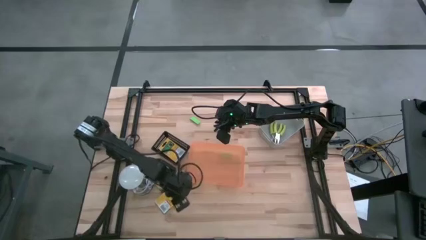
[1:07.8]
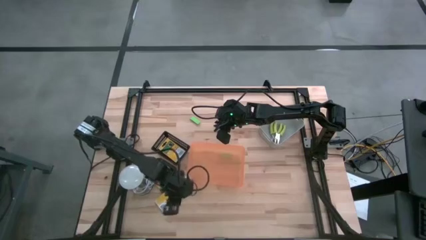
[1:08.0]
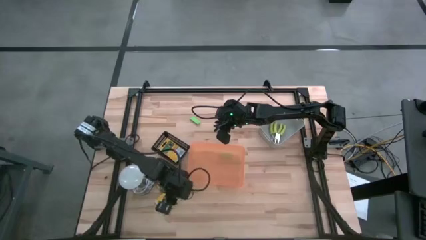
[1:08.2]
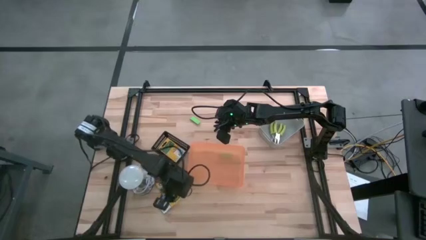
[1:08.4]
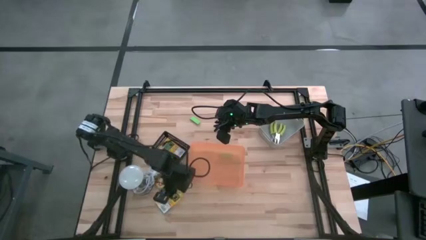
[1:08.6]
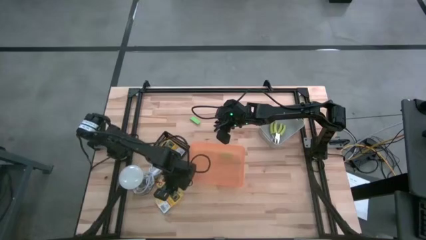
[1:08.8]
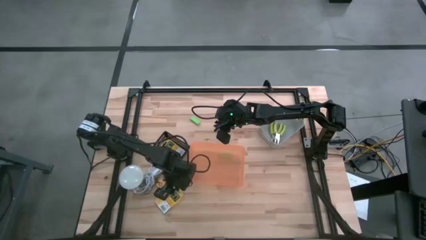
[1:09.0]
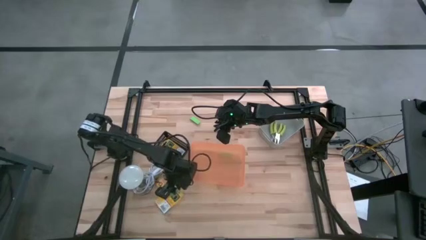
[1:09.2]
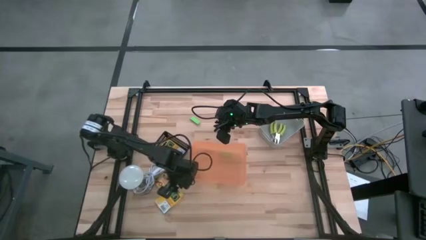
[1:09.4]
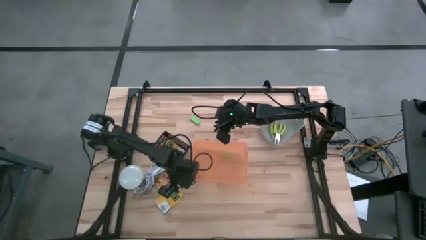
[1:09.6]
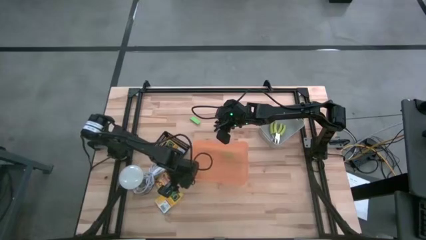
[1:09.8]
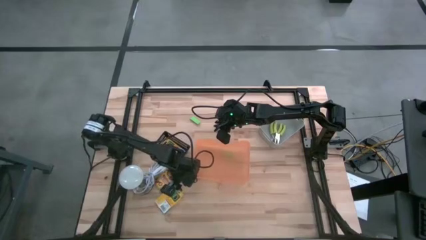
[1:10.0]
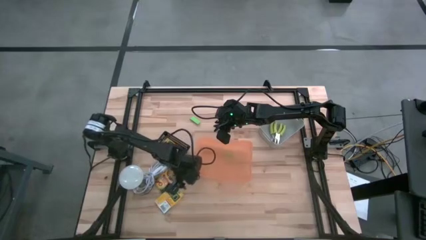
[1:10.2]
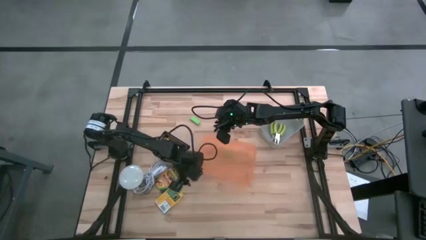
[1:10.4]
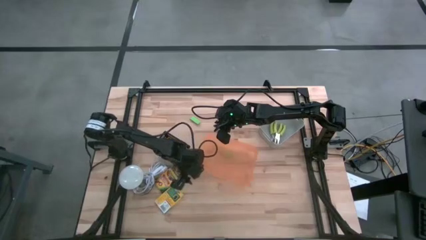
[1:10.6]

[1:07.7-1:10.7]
Task: Pick & Place School Supplies
Adjust the orange bin on the table

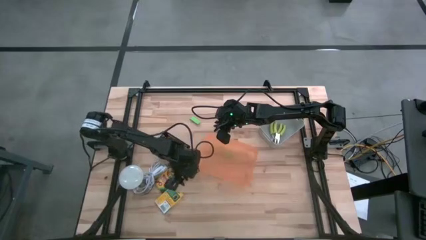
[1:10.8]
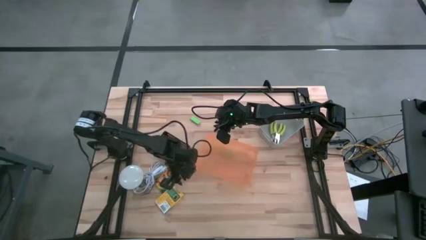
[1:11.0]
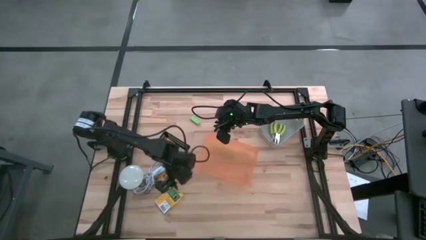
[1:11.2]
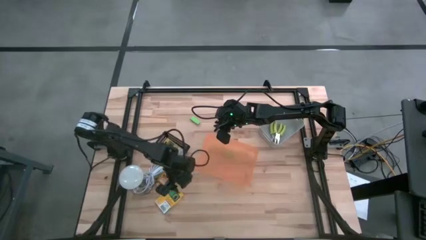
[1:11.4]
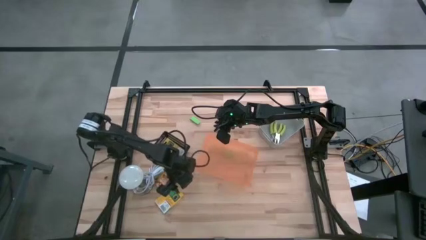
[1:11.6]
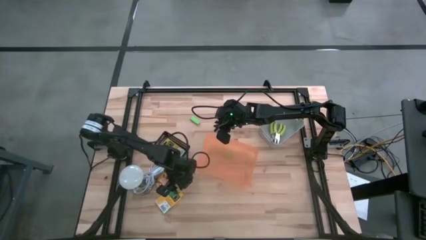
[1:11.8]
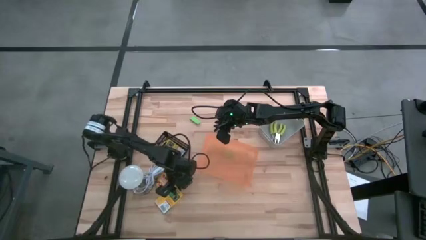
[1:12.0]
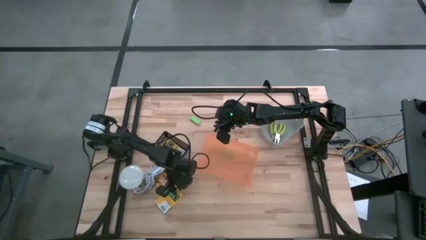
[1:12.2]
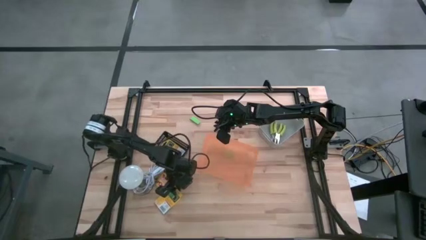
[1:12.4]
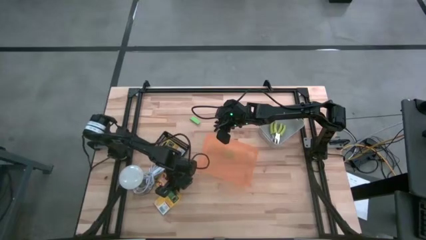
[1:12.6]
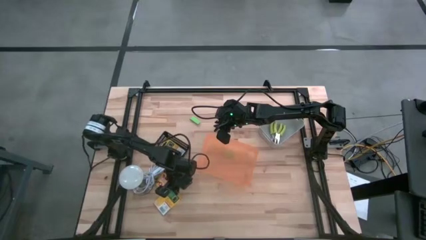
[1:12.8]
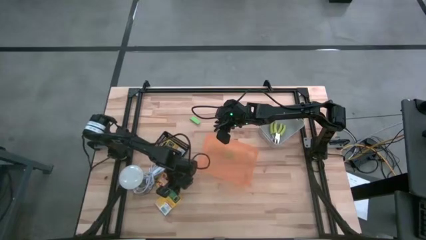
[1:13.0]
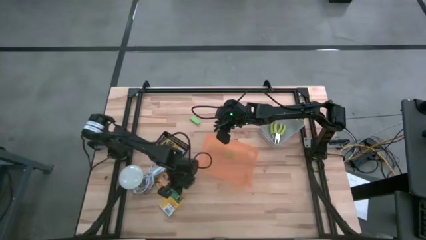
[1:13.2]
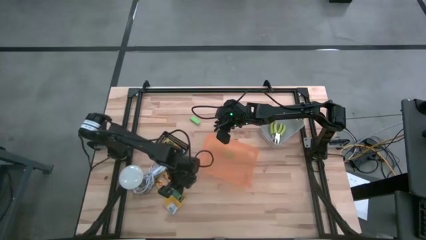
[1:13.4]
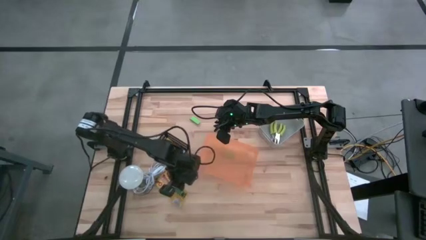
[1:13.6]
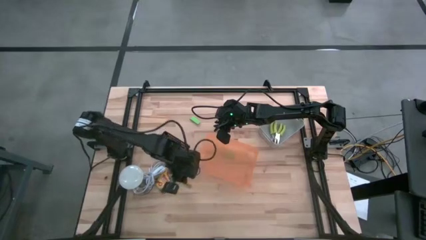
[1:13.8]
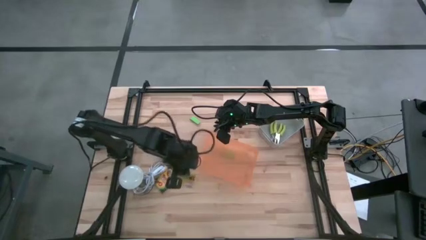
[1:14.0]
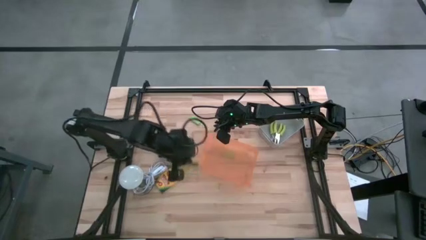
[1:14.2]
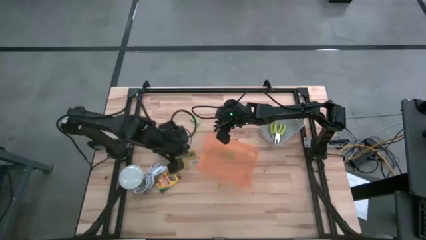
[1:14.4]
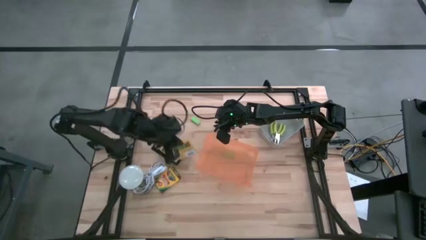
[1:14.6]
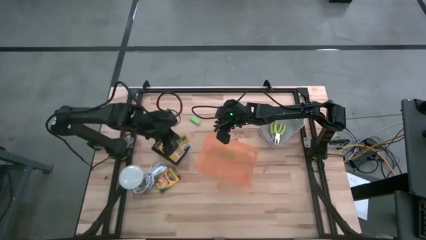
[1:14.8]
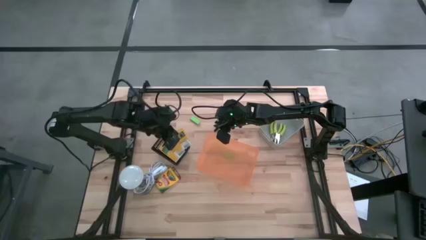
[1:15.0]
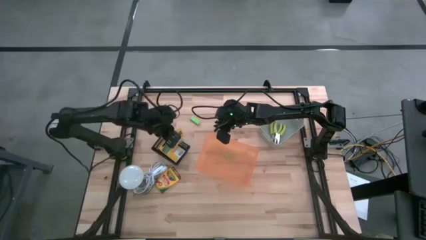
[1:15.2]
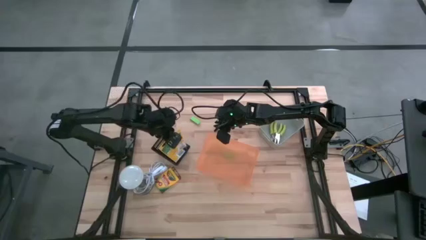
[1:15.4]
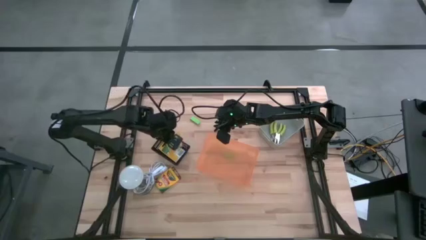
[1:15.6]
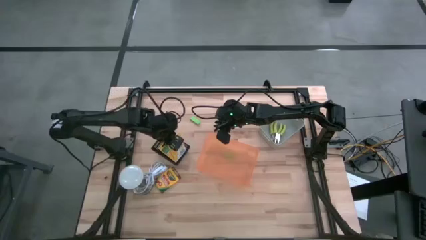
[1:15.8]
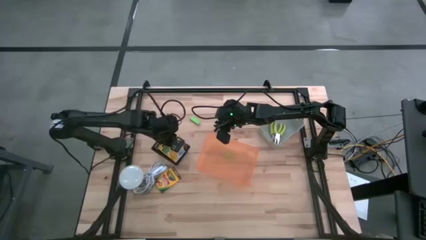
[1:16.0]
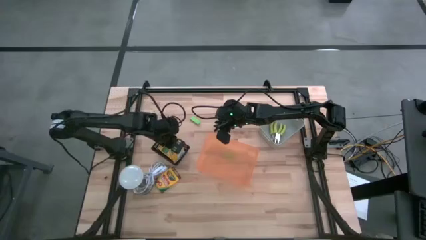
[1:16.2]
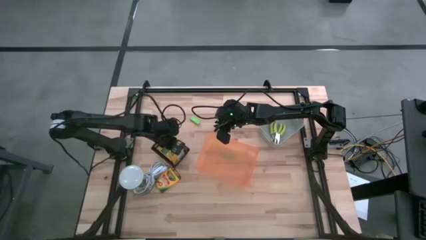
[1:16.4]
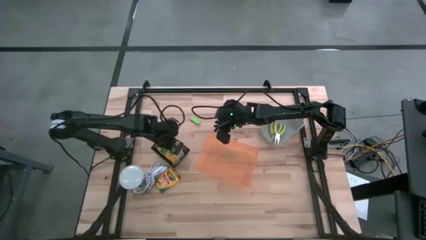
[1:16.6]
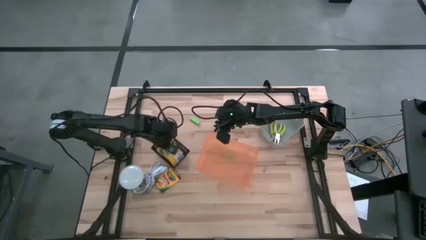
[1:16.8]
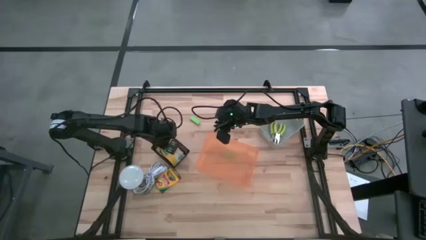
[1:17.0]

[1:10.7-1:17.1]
Put the bottom yellow crayon box into the black bin

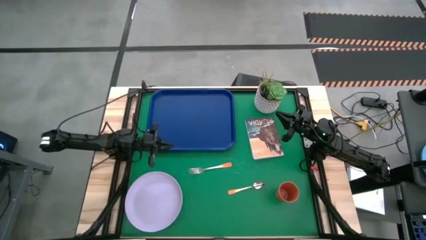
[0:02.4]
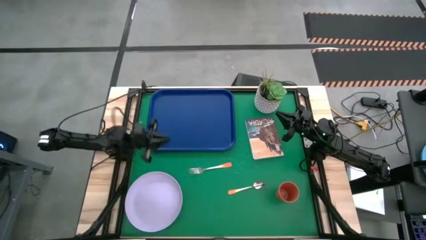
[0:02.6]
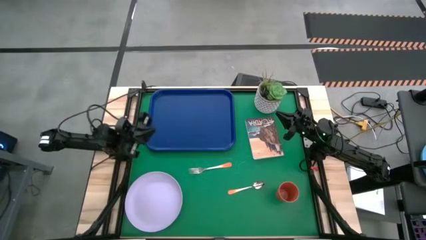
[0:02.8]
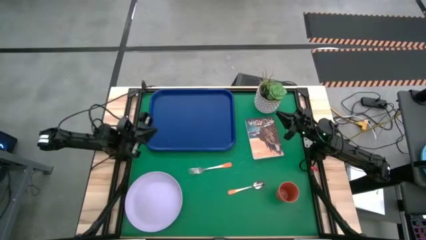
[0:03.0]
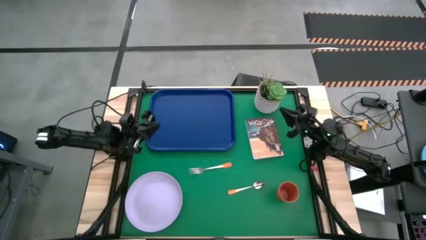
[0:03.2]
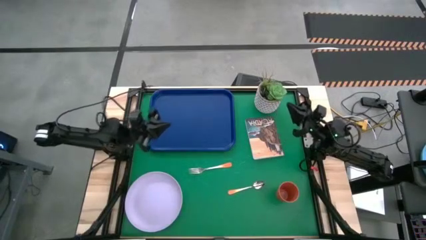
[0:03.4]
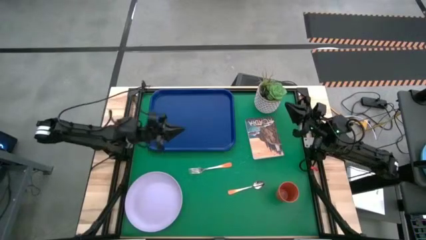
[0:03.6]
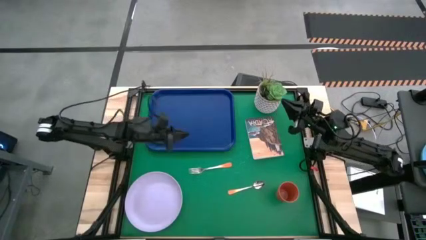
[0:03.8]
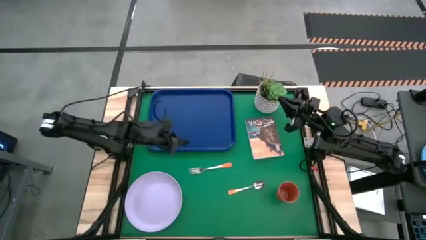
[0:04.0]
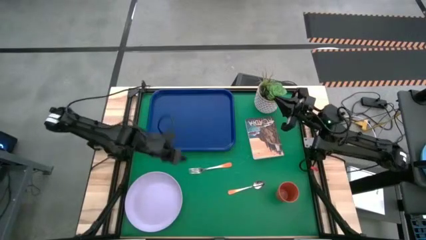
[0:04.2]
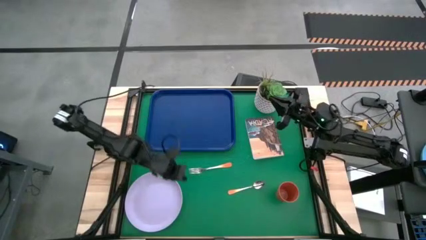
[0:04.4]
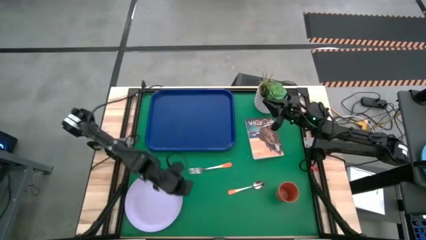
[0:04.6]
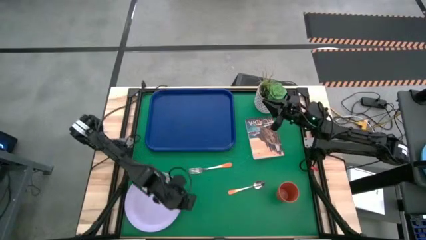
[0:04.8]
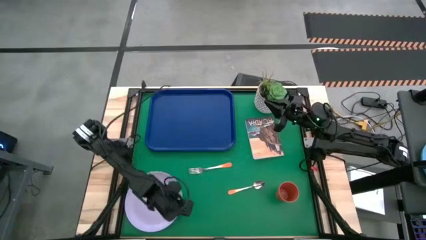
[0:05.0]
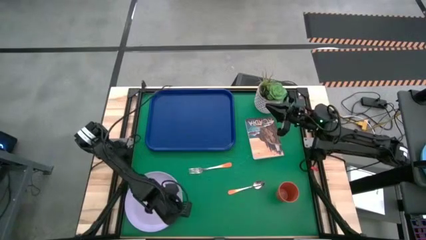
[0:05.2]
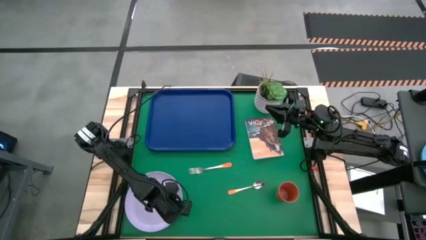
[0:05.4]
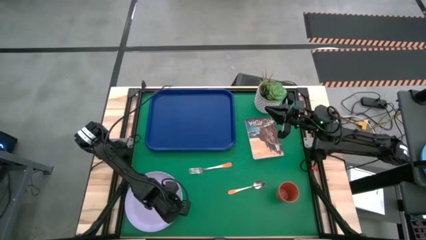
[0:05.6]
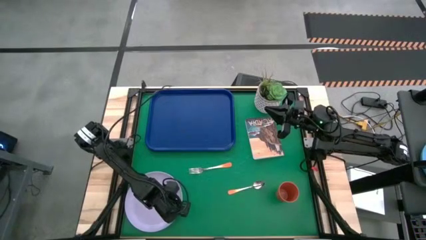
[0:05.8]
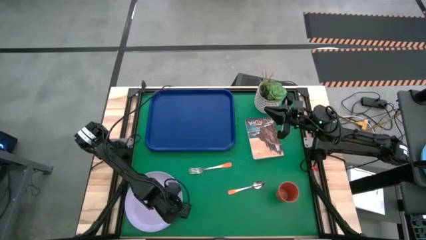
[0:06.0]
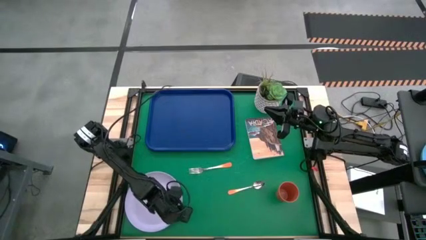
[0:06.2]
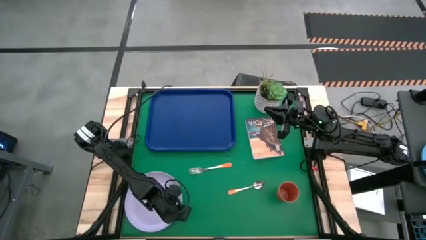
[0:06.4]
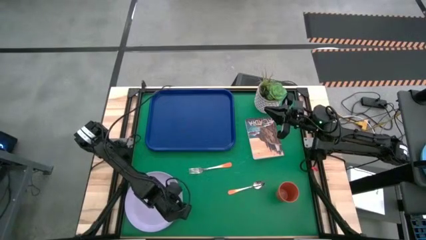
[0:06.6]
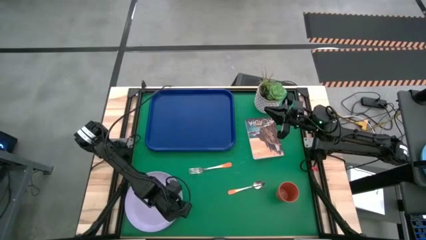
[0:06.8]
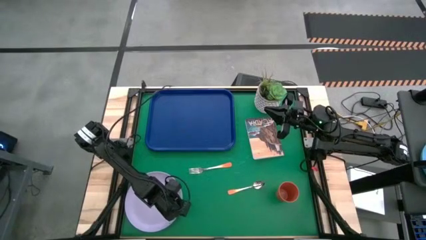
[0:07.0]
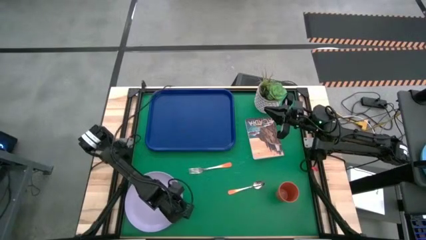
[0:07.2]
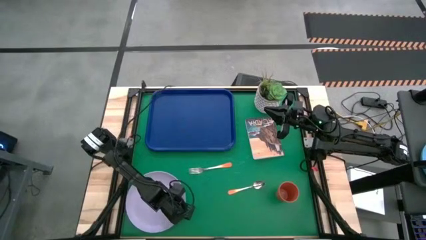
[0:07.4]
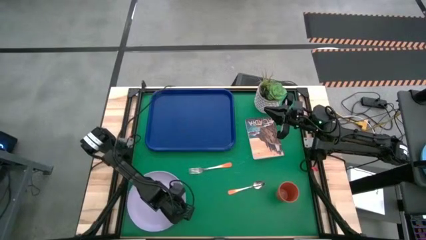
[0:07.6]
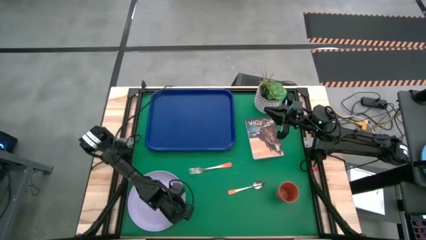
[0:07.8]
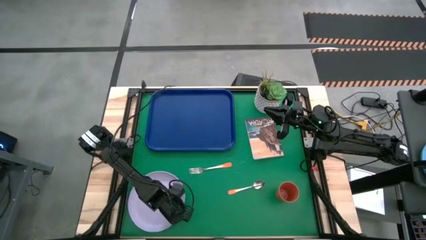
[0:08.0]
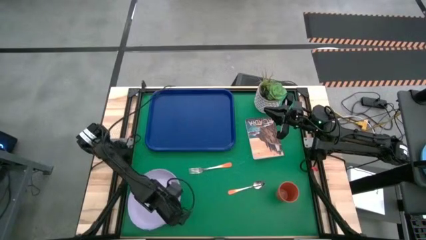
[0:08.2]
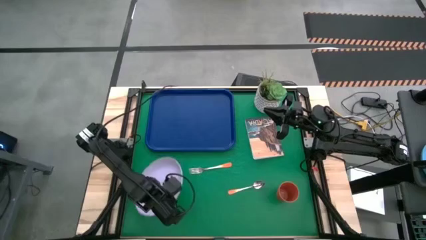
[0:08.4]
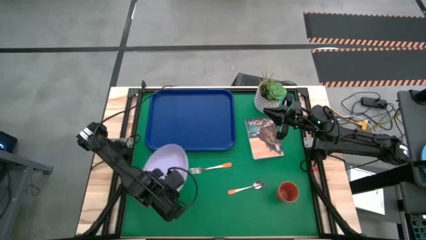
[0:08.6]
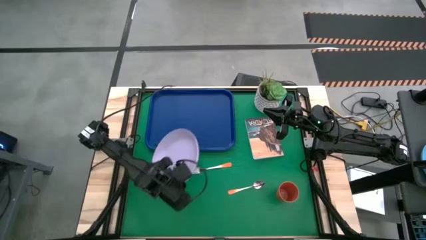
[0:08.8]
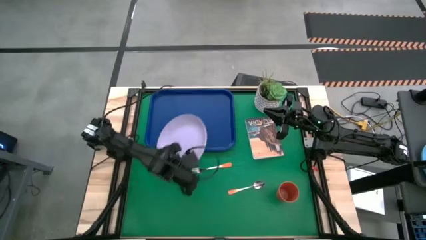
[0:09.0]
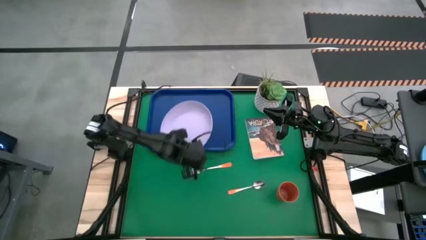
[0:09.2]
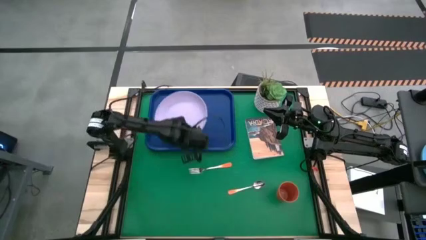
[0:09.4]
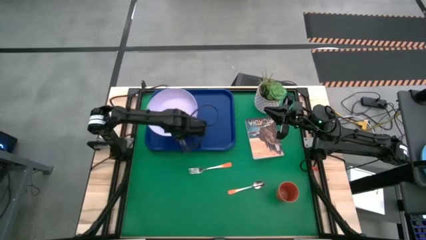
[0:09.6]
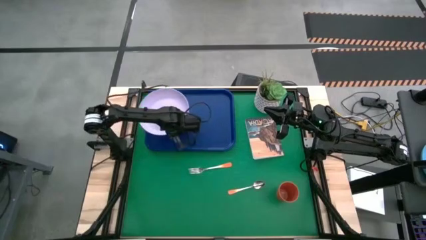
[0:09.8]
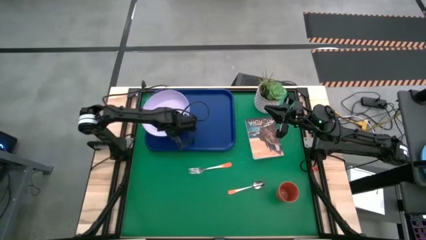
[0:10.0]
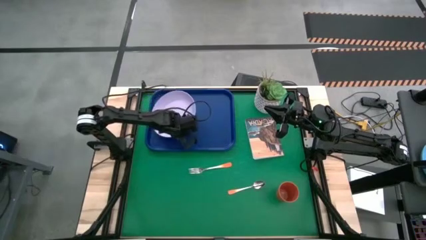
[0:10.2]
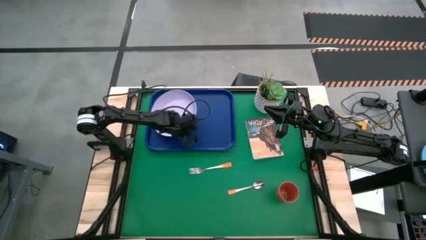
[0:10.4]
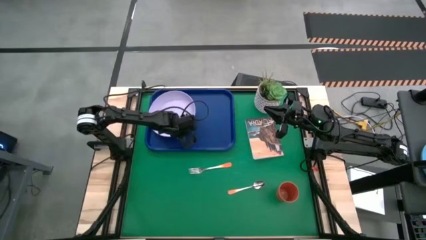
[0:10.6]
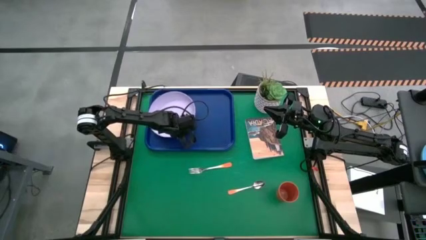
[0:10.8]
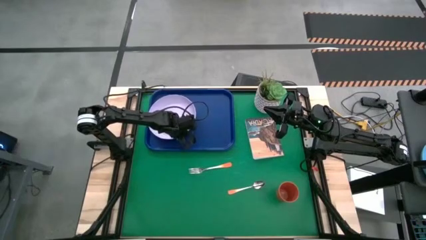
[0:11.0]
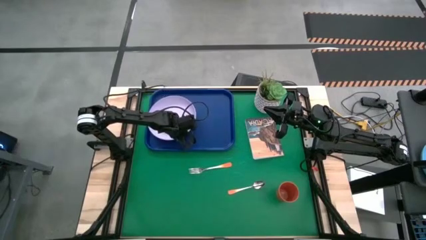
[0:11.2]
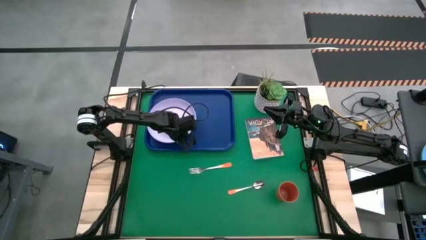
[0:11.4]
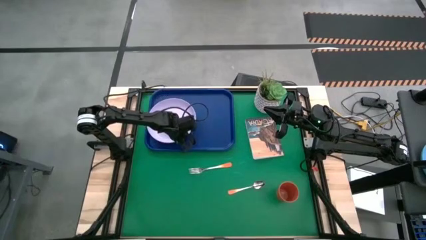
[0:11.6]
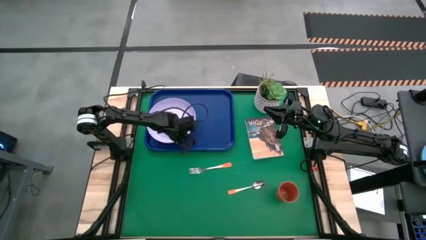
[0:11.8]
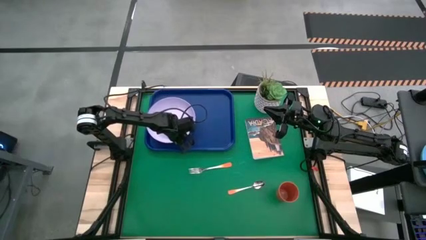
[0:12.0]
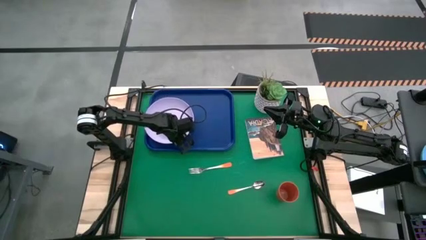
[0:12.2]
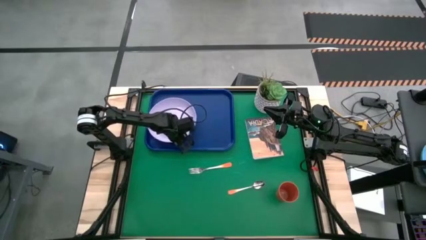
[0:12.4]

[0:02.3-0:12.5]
Task: Pick and place plate/cup/fork/spoon on tray
Put the white plate on the blue serving tray
